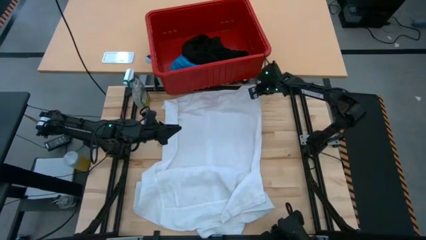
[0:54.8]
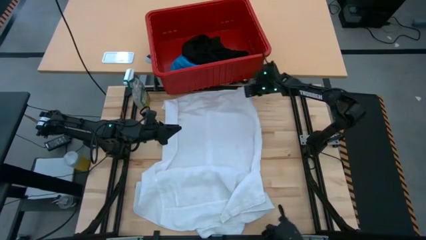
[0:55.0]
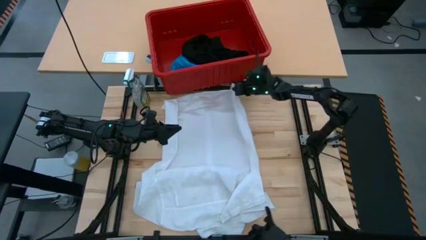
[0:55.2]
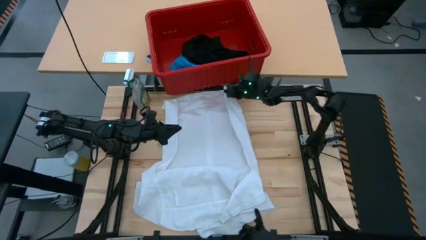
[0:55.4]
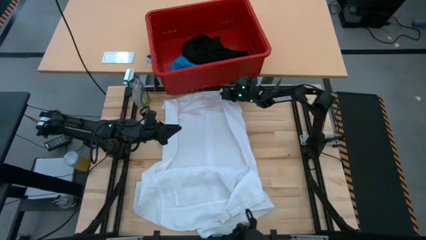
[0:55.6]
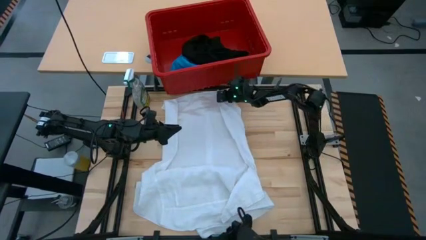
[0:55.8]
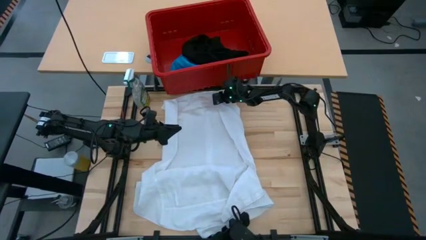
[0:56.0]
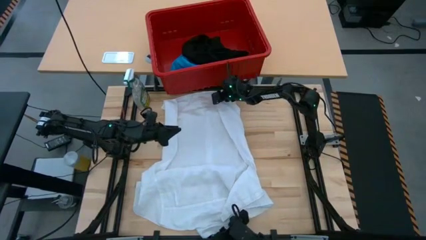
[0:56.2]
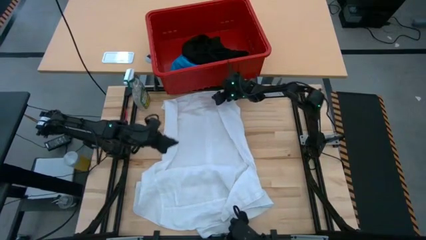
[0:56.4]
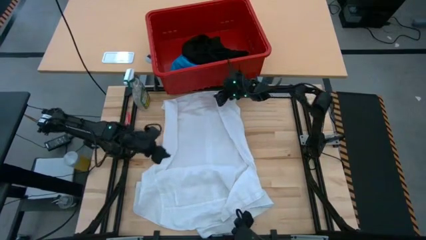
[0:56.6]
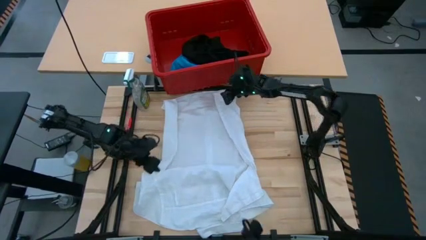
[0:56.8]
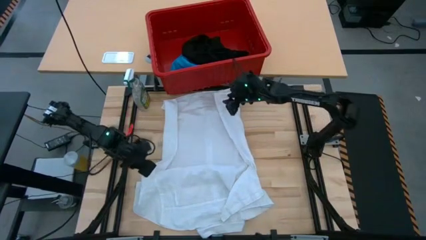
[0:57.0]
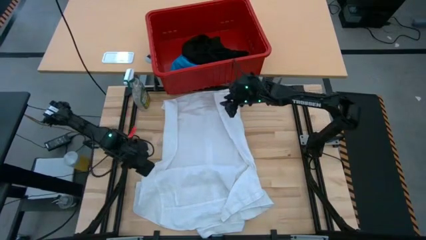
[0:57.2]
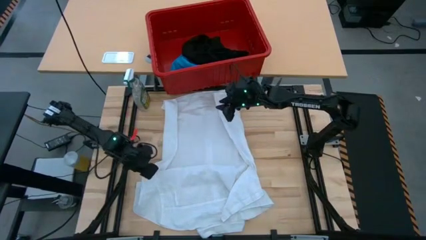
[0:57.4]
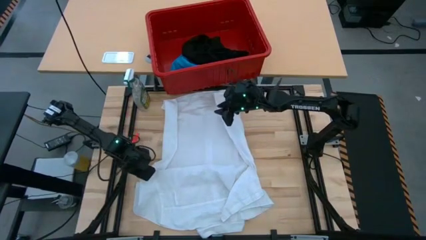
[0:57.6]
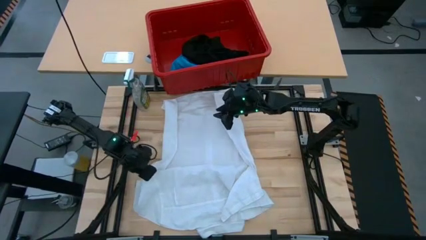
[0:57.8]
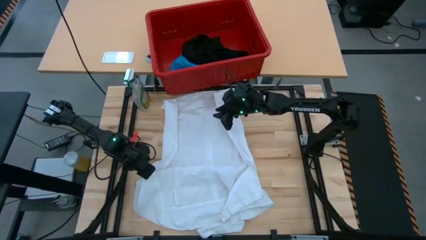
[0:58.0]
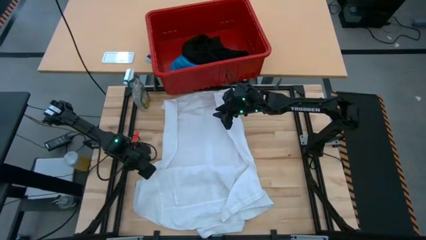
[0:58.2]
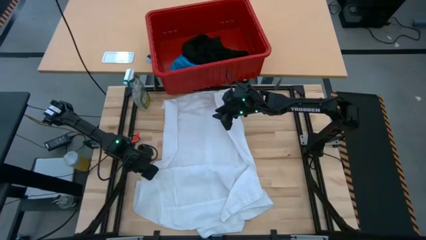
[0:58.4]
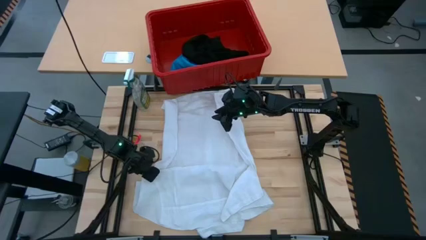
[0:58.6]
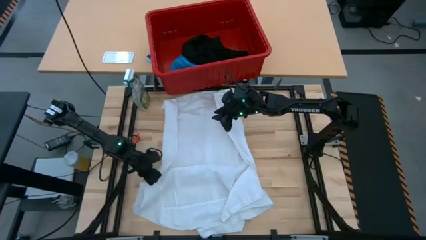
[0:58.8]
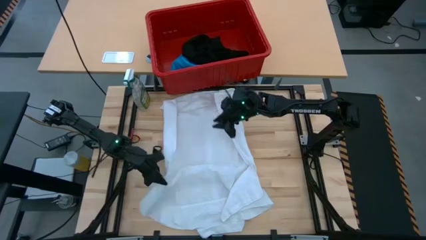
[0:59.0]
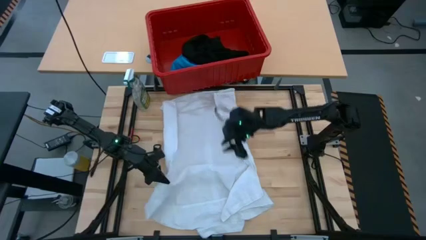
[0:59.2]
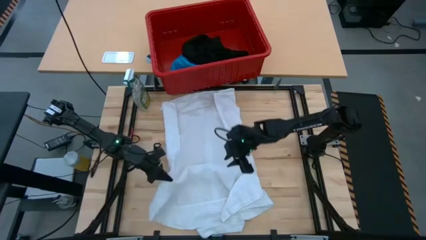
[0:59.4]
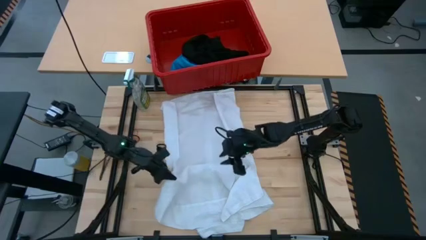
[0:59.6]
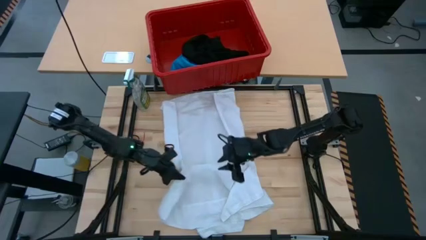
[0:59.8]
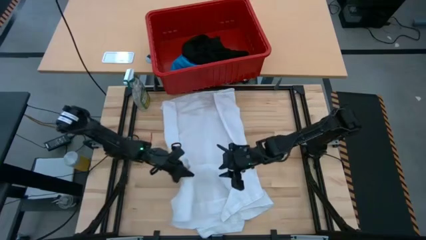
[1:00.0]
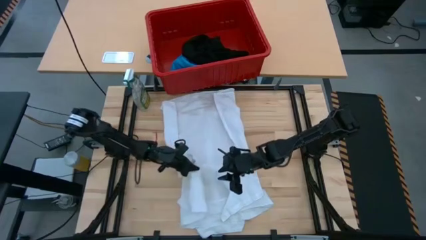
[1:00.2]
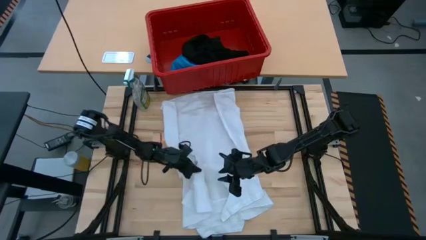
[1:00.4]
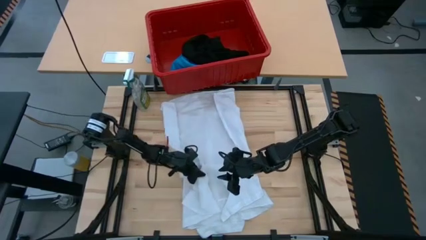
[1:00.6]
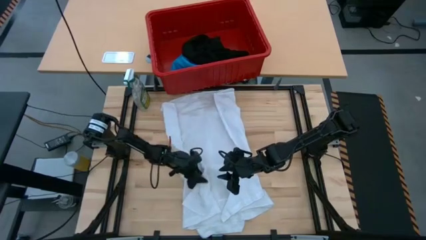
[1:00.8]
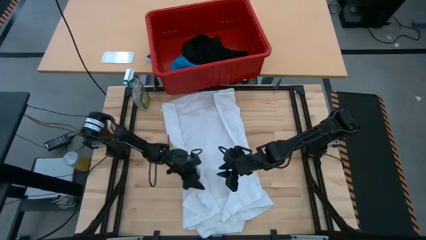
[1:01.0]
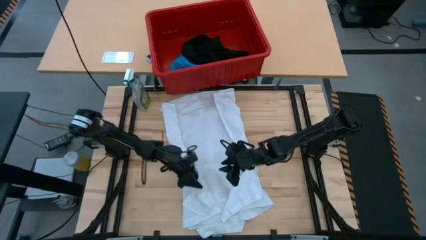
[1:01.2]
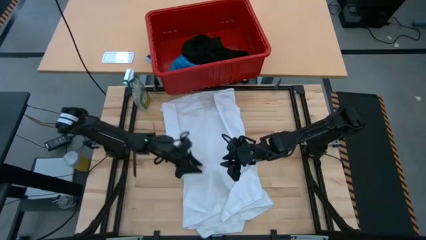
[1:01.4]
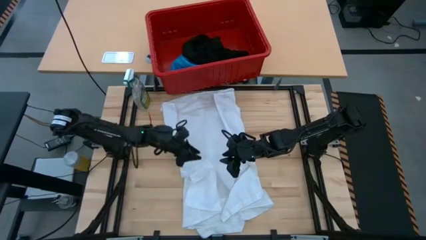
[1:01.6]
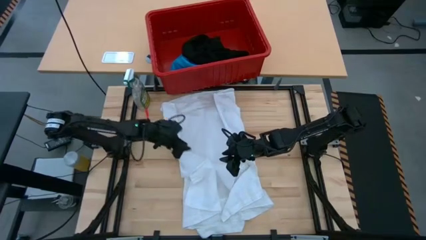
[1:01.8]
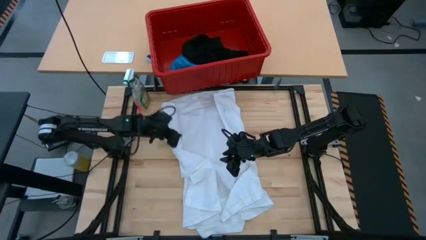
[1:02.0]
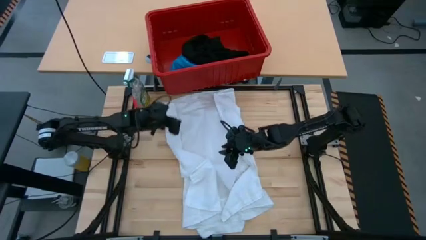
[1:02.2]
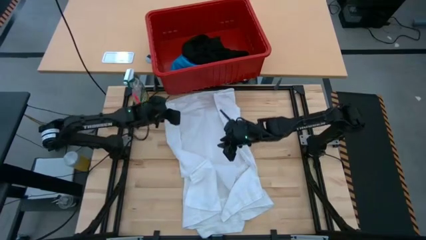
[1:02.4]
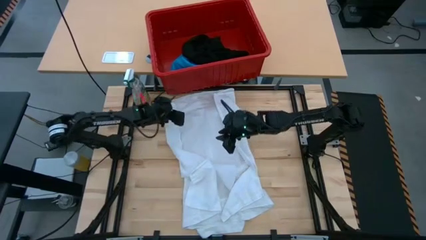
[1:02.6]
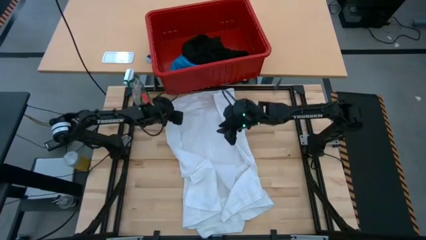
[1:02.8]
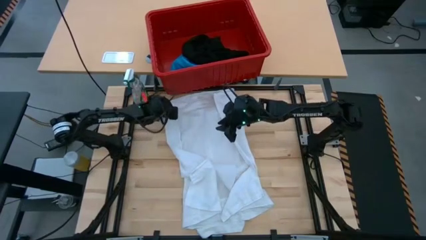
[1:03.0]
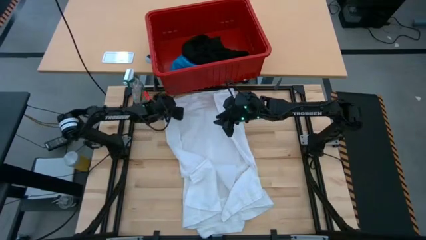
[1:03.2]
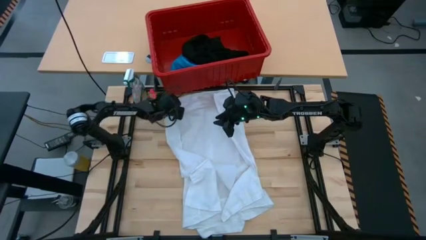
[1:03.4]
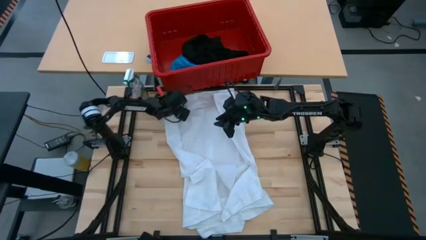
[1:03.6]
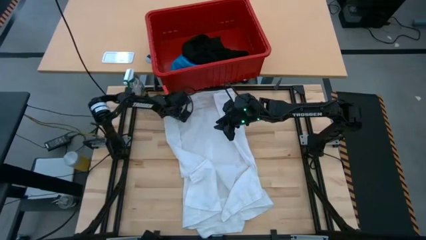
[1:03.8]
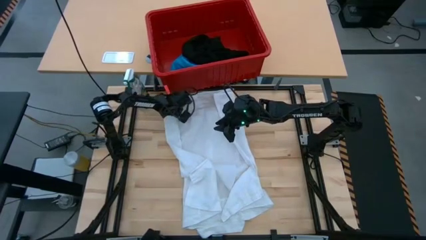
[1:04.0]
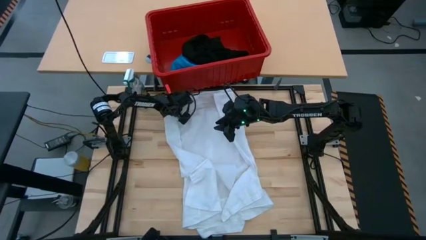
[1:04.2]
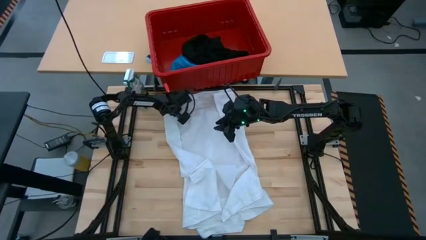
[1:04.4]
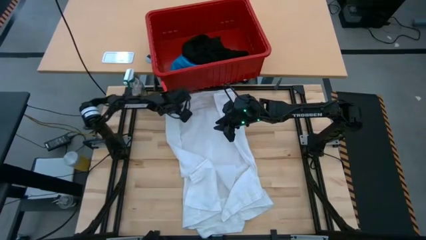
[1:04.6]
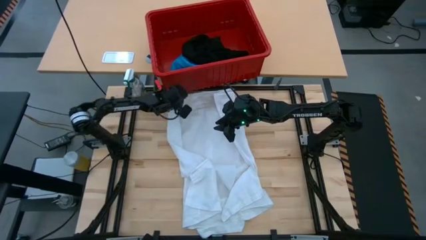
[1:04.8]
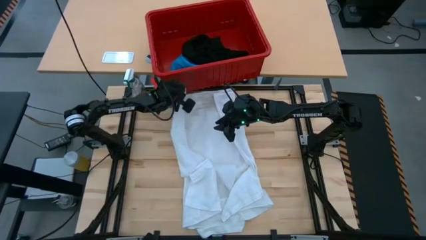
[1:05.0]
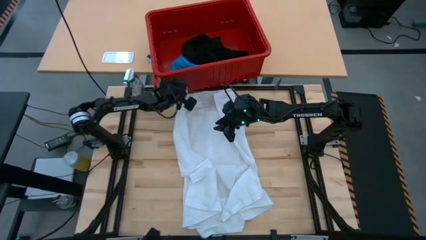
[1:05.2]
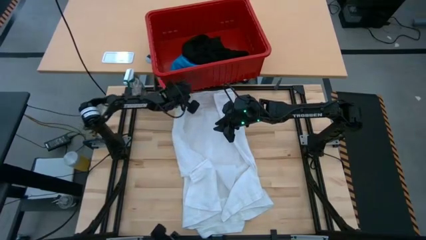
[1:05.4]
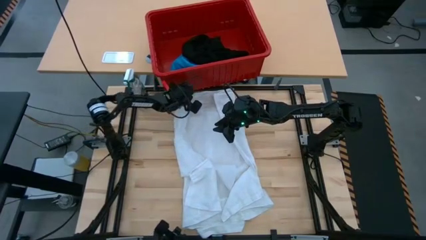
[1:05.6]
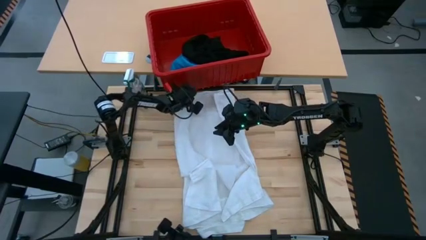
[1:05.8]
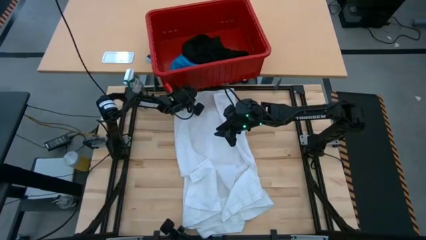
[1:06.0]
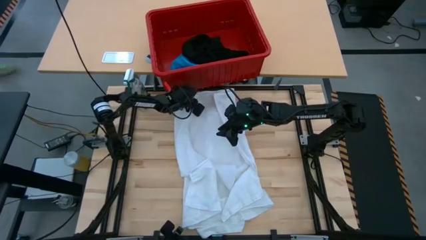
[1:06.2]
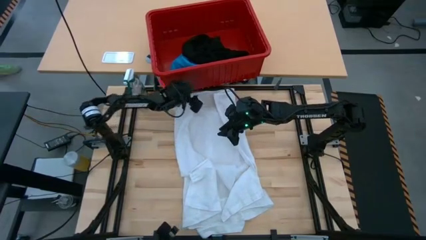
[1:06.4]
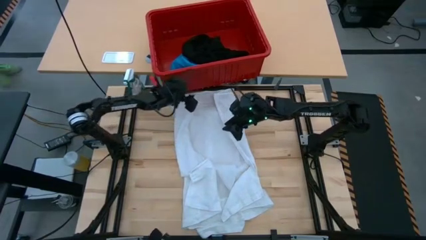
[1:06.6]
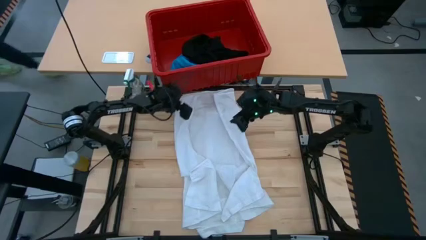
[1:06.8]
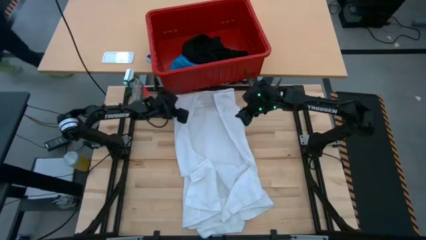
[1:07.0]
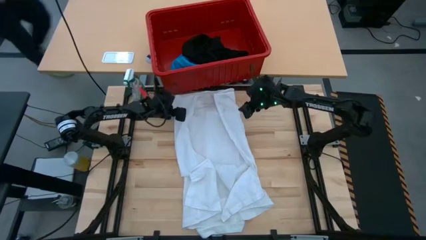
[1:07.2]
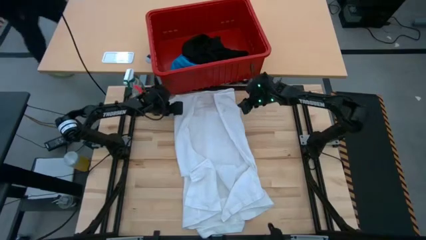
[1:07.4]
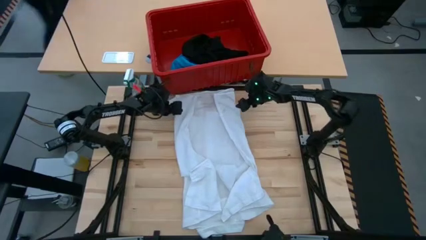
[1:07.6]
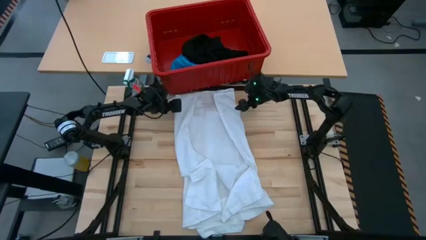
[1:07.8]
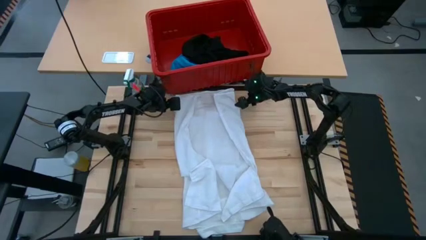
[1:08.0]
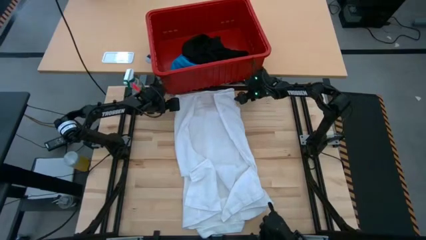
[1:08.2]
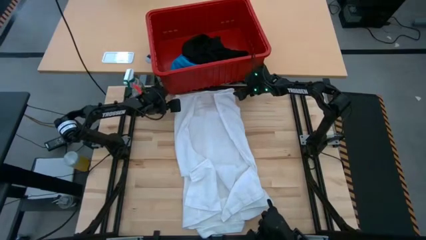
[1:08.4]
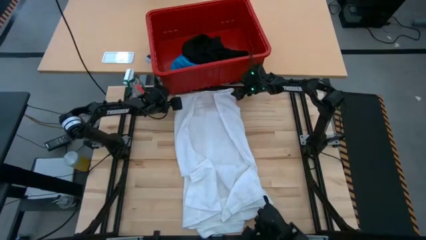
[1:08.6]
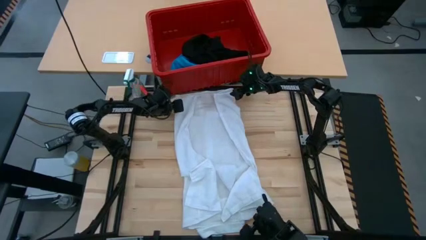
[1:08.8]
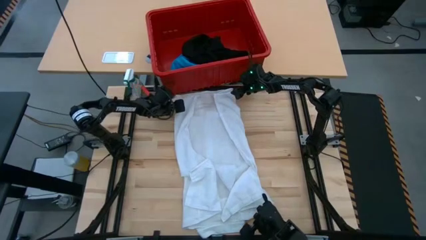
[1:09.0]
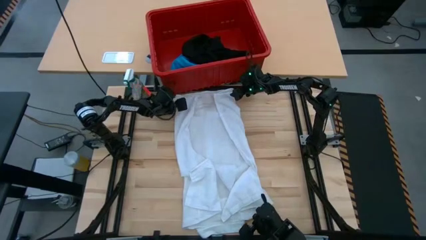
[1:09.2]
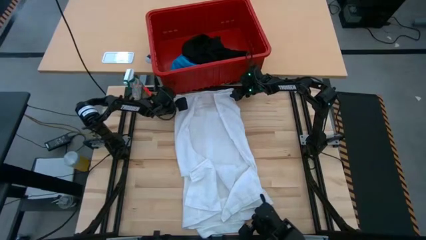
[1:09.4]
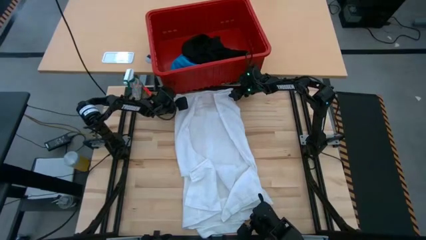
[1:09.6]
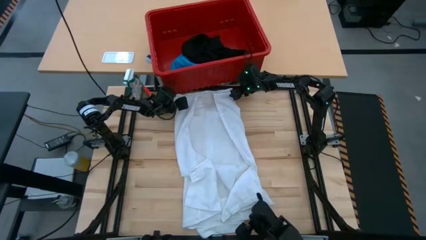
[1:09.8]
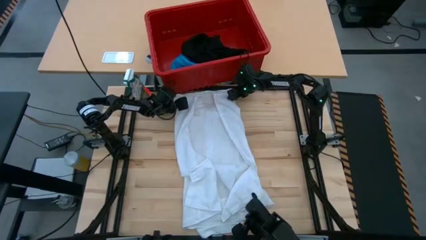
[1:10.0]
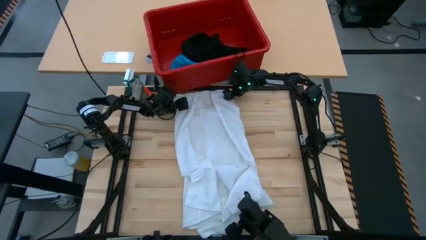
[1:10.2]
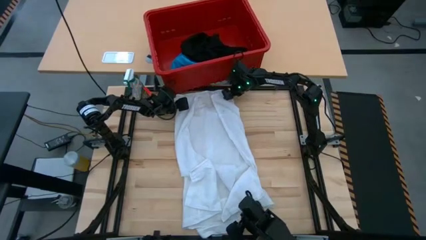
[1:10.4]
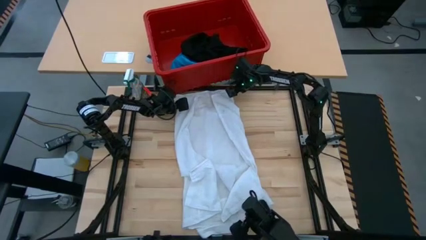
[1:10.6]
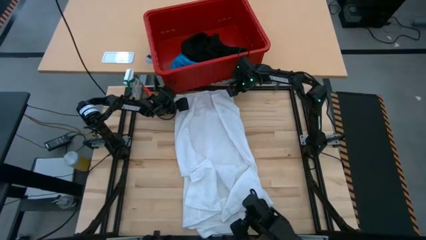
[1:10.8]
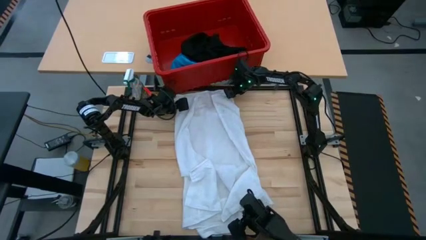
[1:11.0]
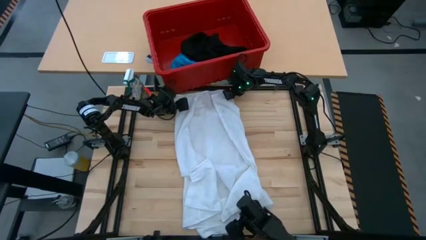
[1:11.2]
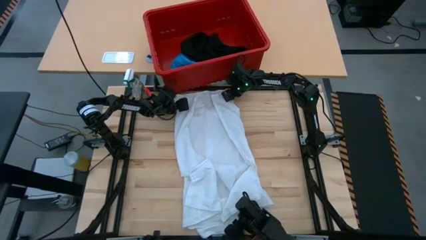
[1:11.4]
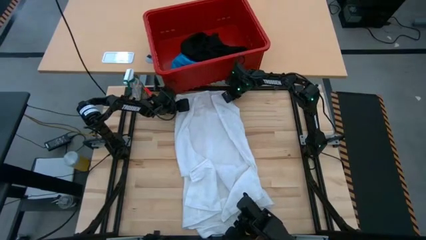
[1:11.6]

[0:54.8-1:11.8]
Task: Fold laundry
Fold the white polo shirt
